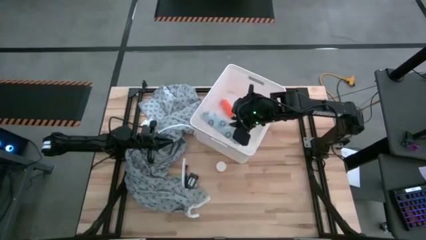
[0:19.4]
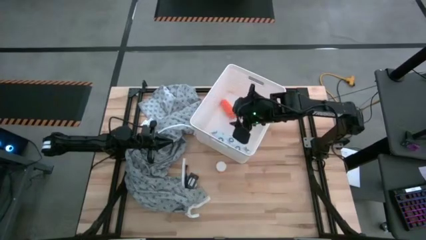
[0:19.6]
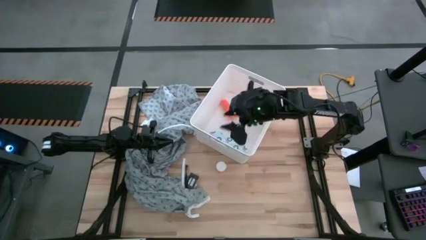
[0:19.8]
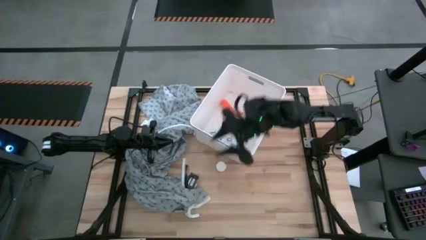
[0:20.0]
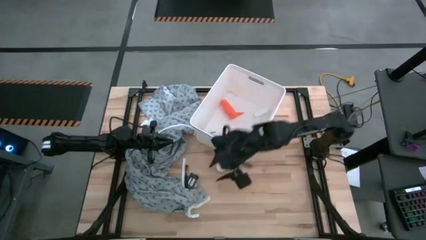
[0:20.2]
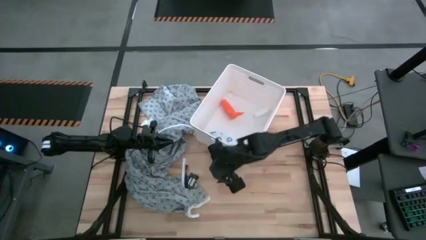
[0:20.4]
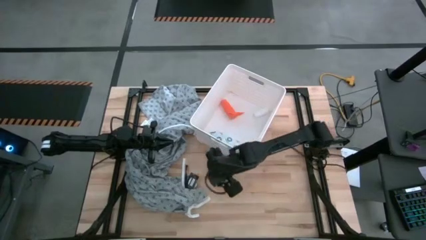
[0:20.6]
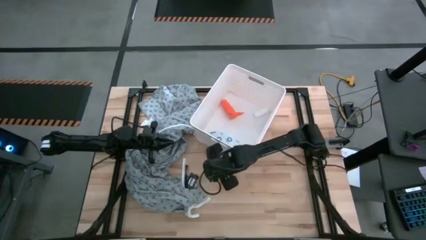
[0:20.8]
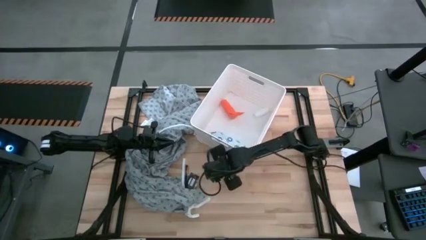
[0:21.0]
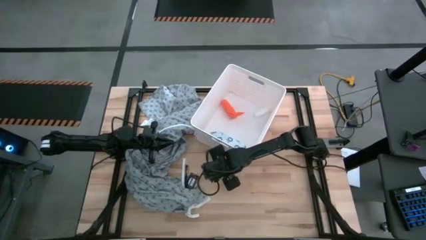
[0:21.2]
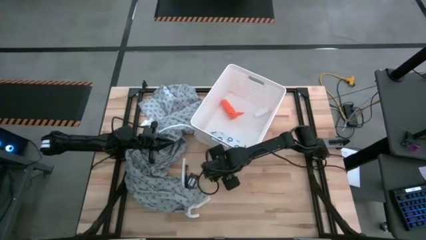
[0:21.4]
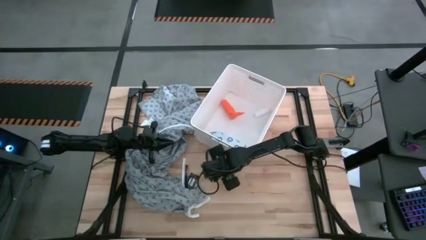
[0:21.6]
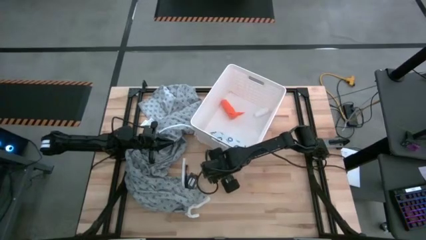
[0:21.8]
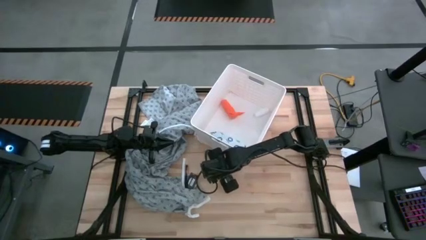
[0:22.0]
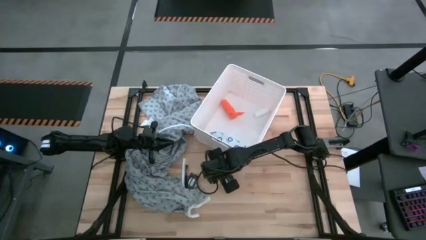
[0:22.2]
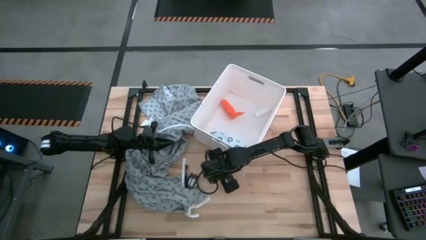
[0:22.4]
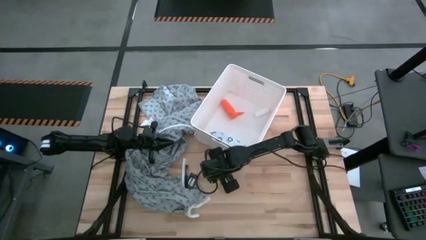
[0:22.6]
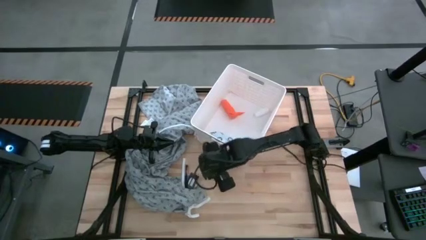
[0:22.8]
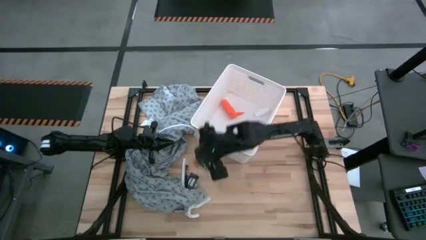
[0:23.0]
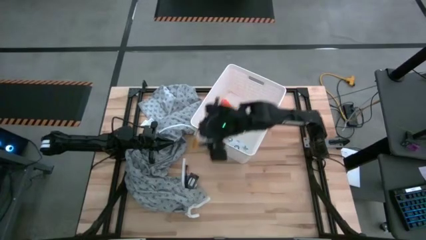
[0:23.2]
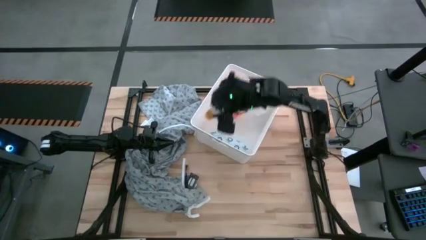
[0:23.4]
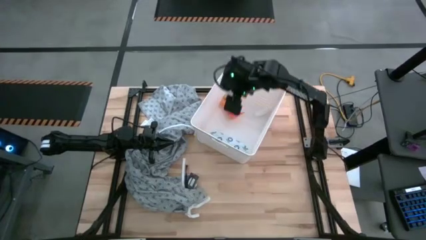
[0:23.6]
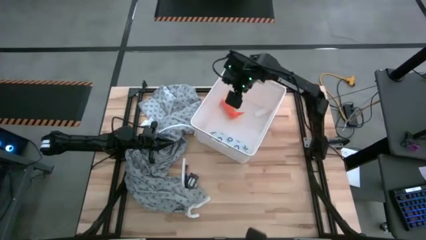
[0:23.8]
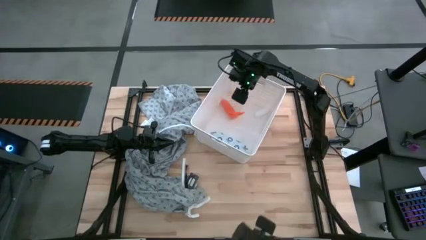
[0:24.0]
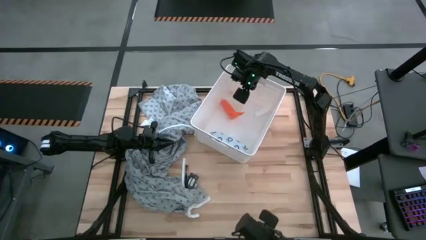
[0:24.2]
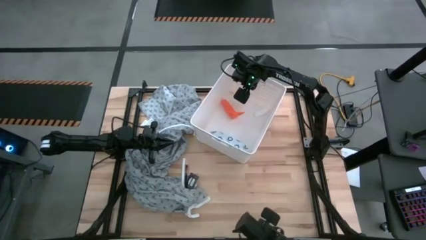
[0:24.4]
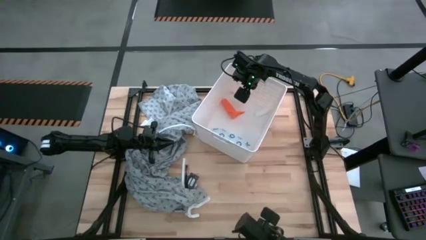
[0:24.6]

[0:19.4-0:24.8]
Task: Pick & place medical supplies in basket/bin
Put the orange pill bottle into the white bin

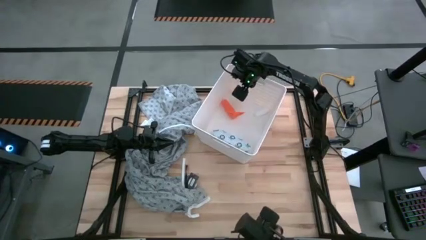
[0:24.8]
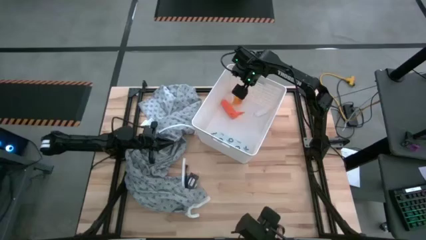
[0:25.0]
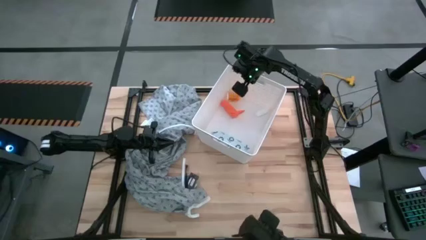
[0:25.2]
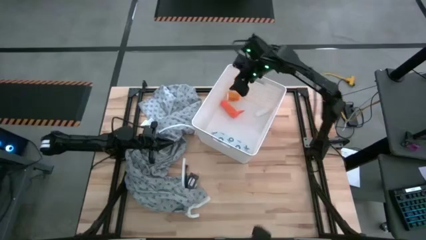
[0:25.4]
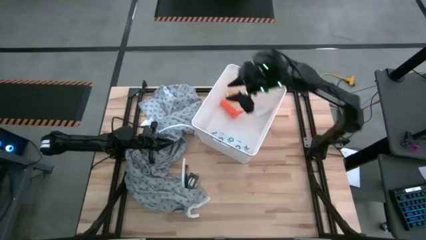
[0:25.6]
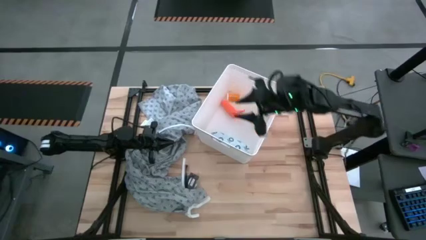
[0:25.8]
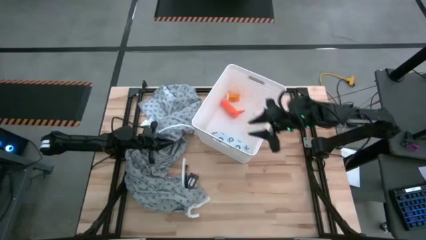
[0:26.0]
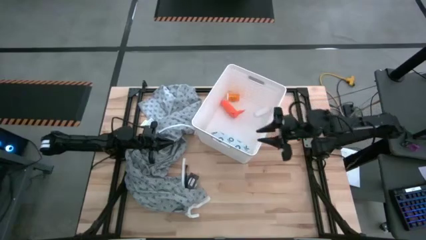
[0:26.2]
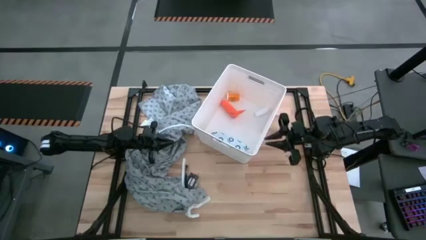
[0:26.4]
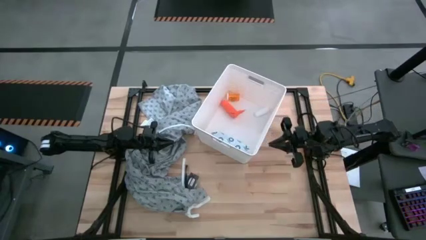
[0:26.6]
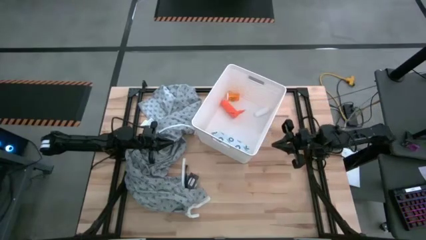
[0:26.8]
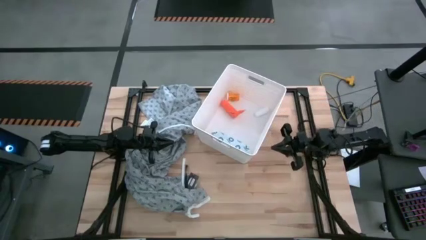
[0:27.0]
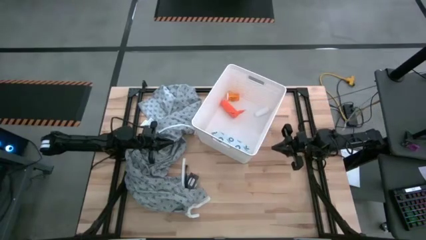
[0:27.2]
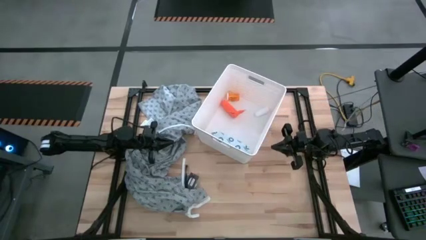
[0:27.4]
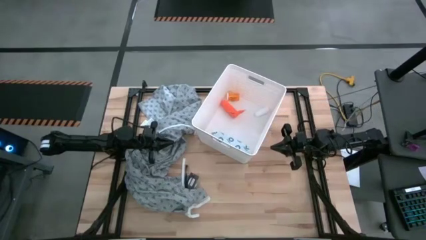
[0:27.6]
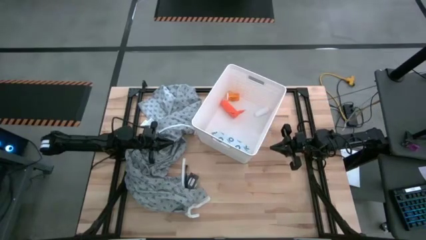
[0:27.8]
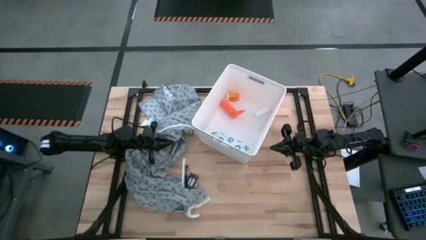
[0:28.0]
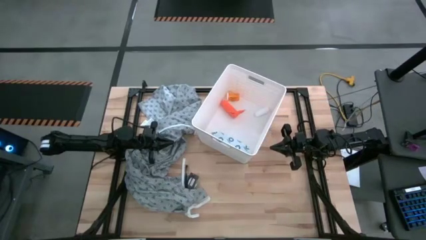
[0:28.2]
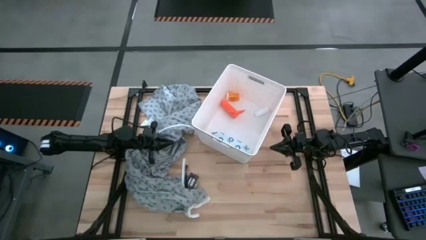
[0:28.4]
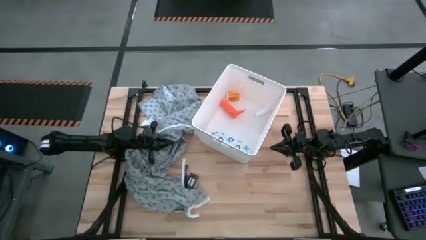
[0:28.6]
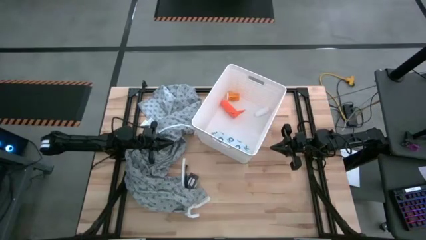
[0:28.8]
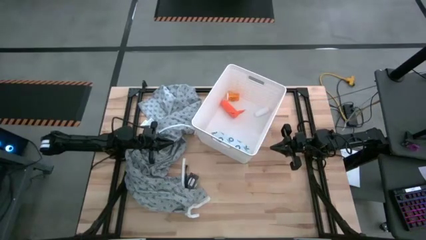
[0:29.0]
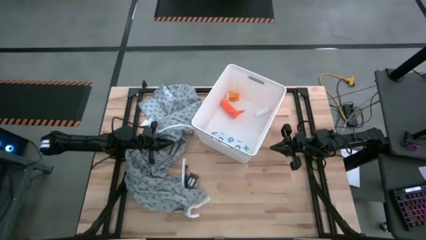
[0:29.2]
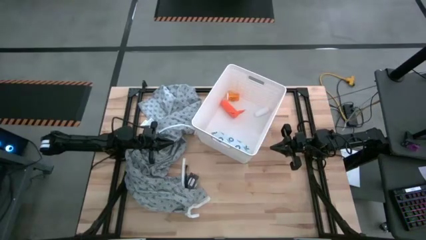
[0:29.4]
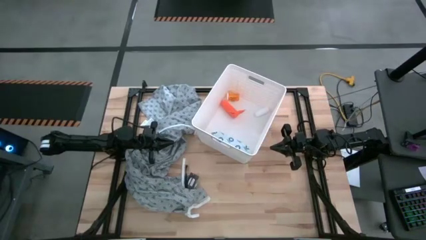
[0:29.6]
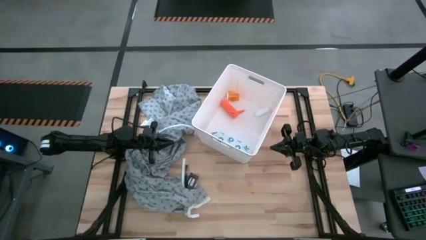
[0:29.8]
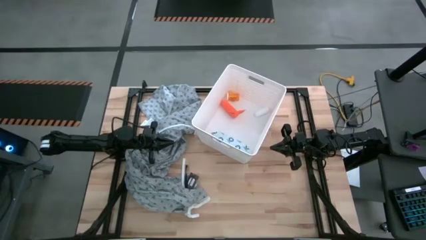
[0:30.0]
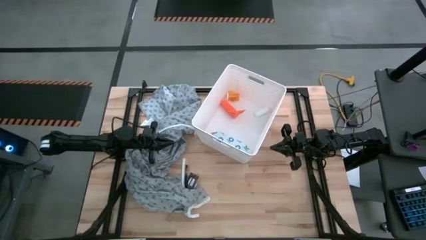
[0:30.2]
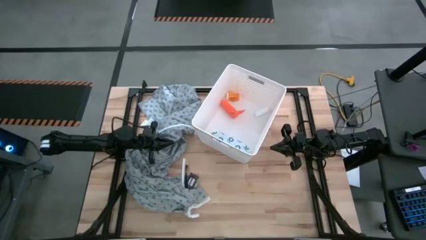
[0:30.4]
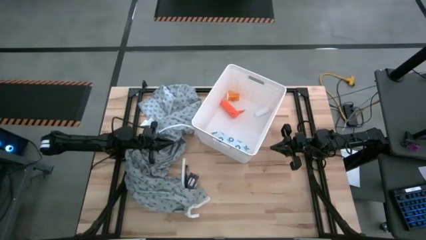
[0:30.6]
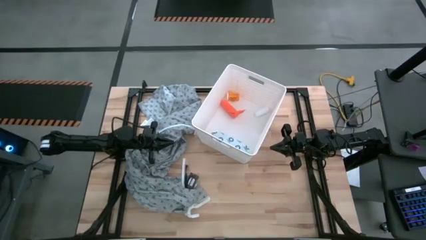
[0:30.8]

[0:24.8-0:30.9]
Return to Home Position

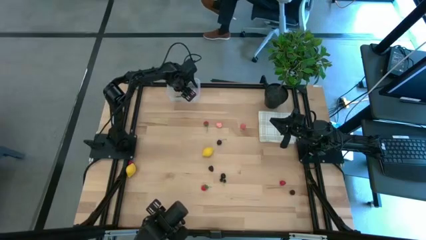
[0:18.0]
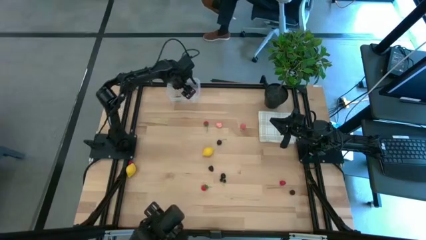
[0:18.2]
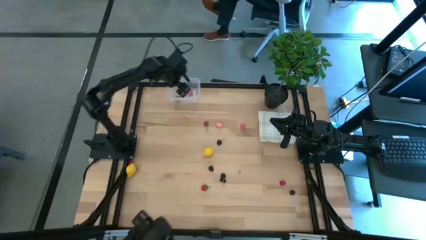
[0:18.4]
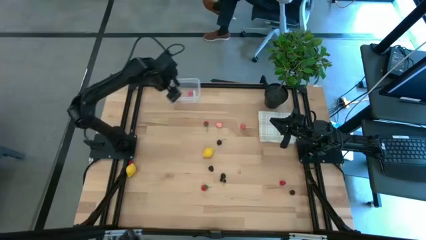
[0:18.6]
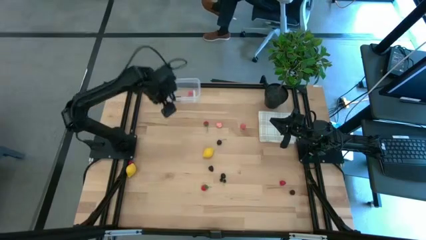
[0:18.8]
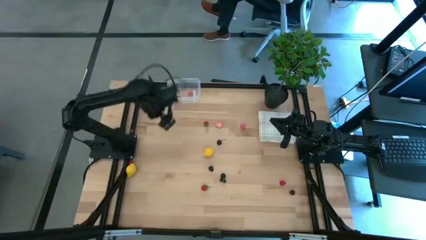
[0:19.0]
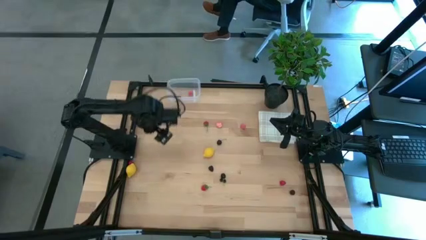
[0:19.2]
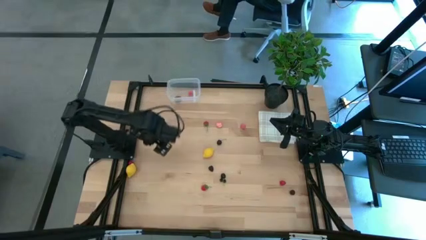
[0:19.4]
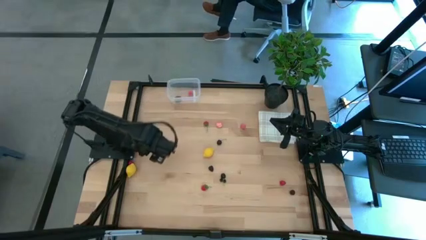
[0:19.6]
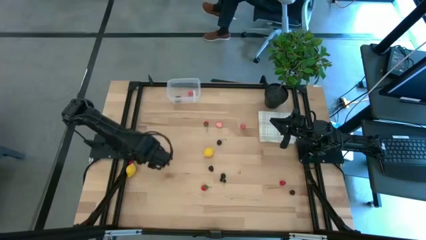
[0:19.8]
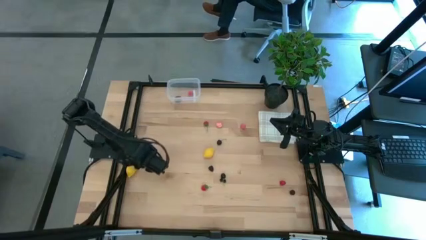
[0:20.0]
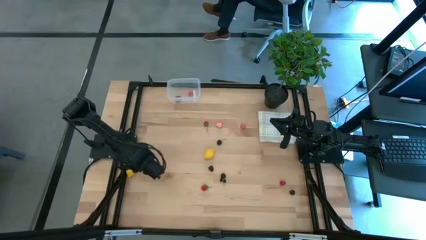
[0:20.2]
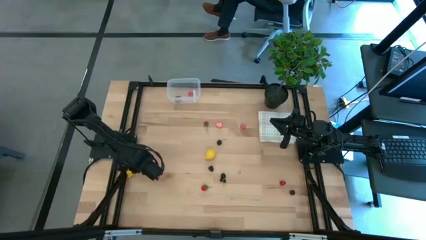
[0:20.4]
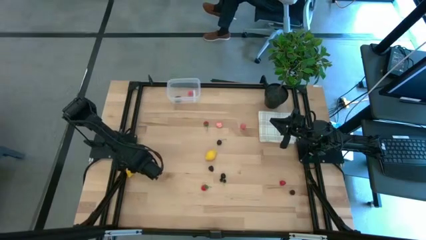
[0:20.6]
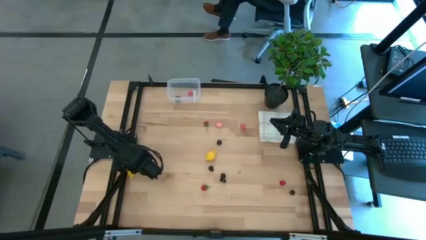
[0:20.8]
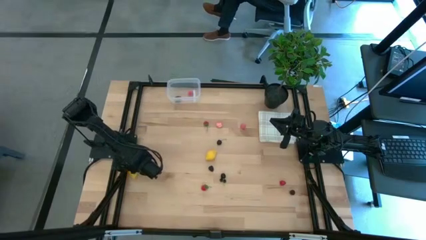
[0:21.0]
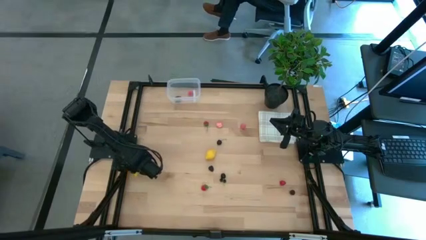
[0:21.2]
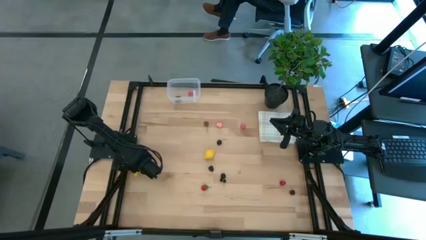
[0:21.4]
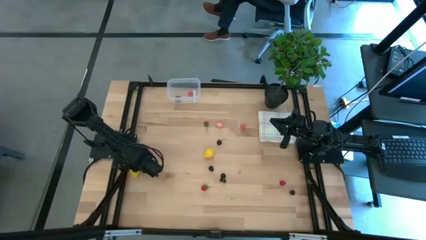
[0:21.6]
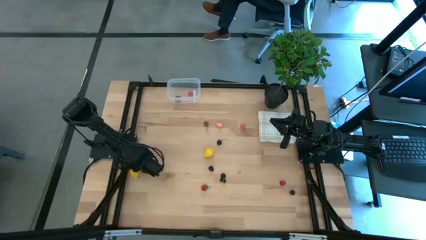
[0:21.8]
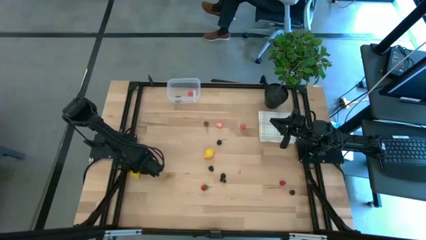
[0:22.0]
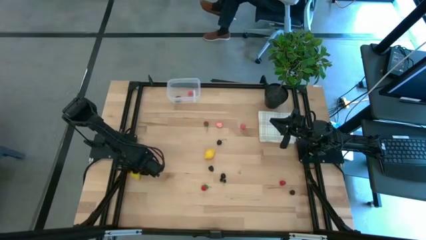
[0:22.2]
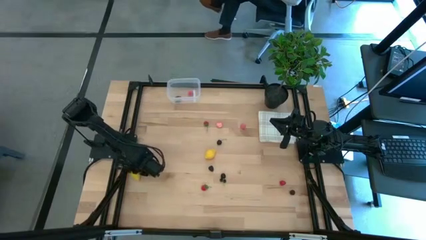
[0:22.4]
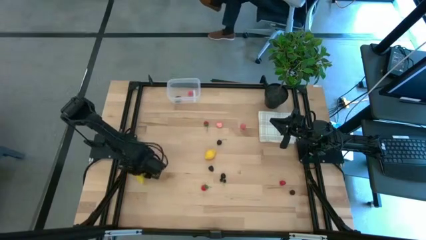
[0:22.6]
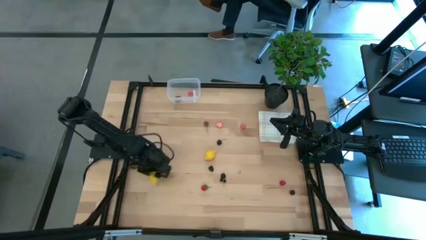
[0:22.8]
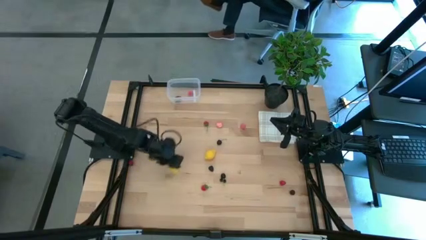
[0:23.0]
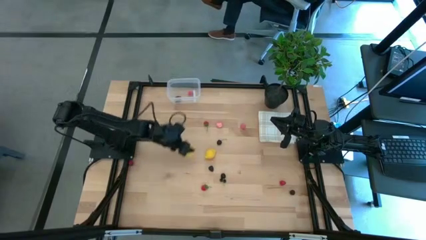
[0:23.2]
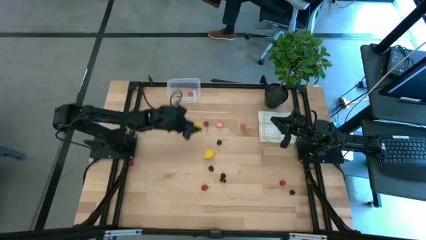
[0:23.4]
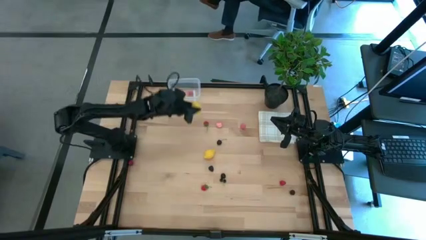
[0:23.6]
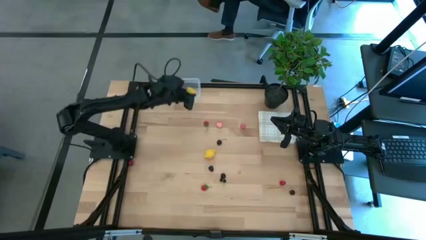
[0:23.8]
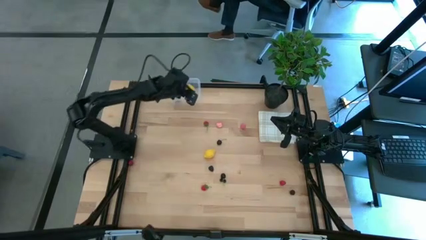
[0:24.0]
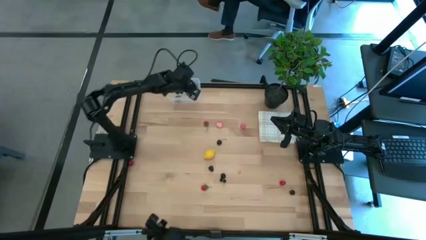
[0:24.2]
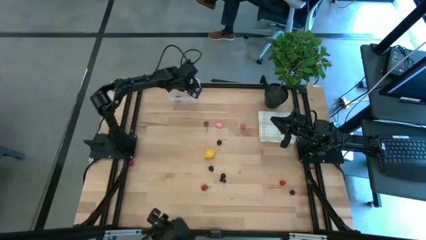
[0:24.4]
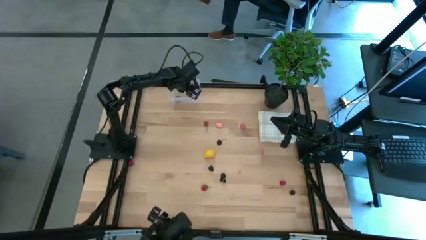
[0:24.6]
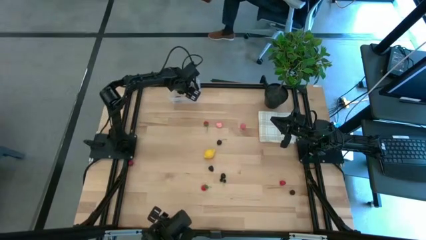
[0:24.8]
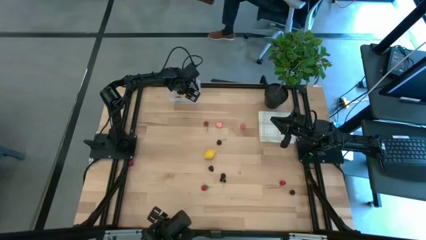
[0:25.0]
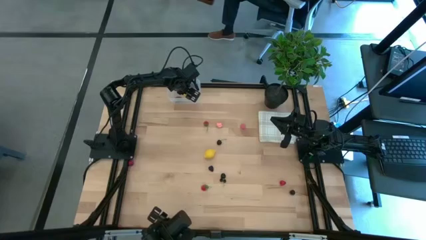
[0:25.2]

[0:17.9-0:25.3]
Task: Pick and placing Produce into tupperware
Put the bottom yellow lemon into the transparent bin
